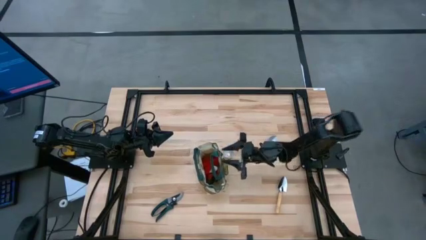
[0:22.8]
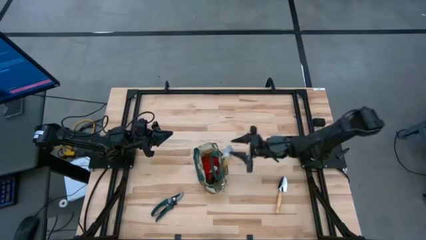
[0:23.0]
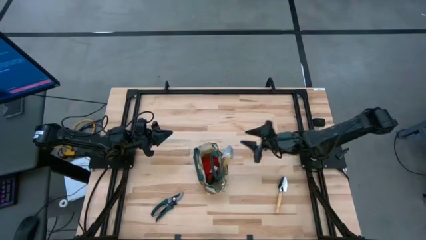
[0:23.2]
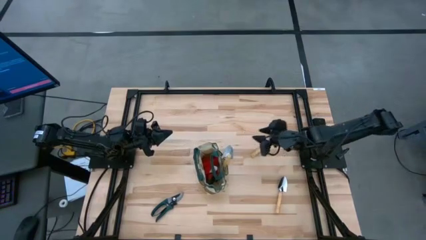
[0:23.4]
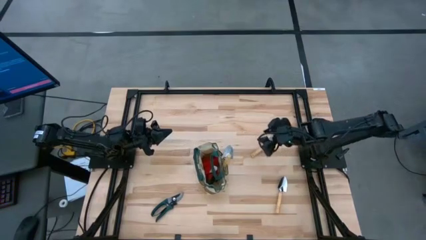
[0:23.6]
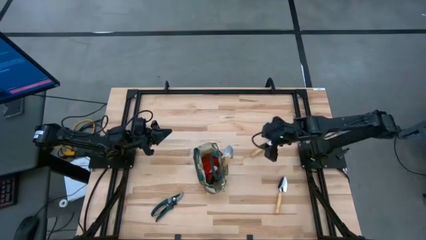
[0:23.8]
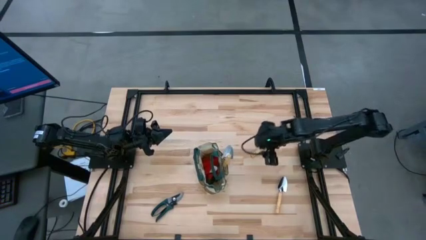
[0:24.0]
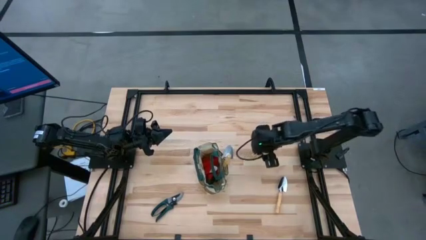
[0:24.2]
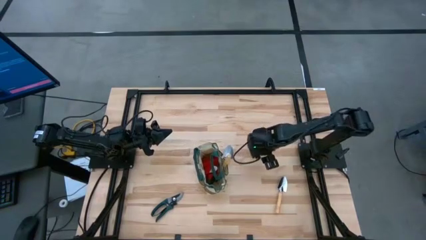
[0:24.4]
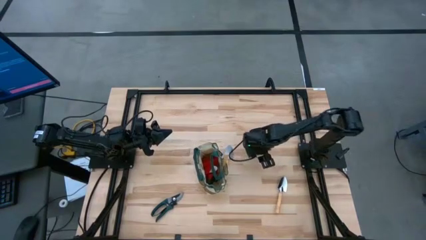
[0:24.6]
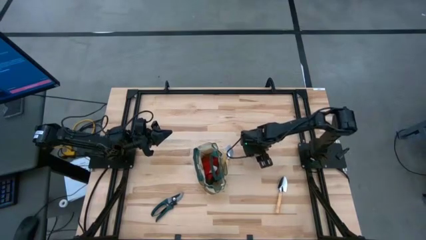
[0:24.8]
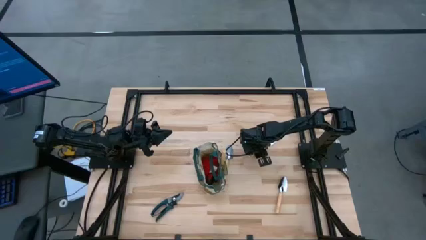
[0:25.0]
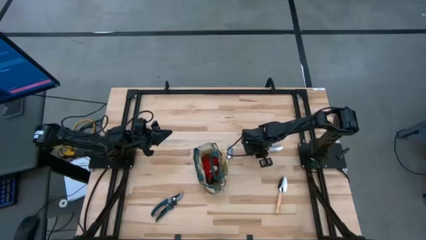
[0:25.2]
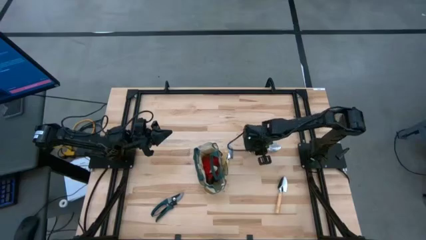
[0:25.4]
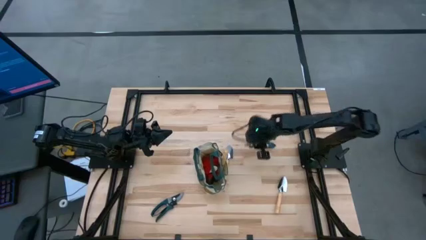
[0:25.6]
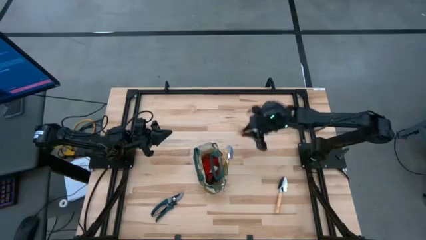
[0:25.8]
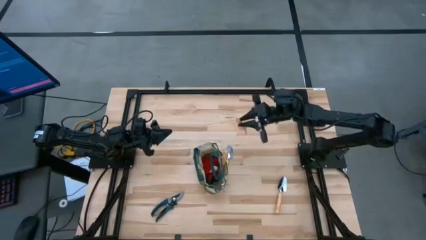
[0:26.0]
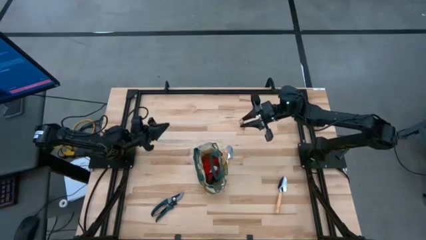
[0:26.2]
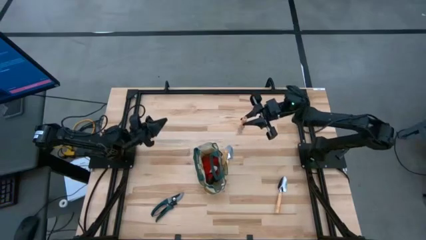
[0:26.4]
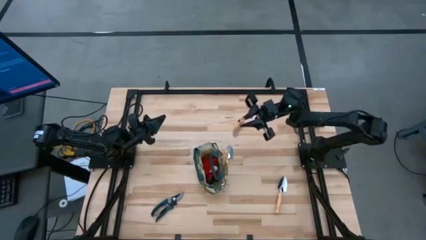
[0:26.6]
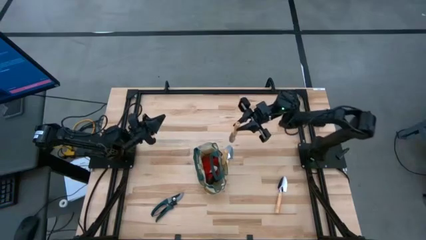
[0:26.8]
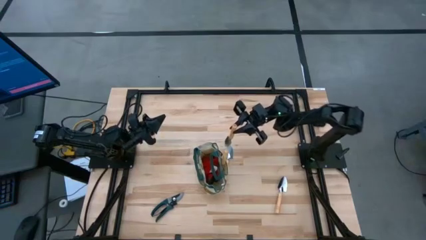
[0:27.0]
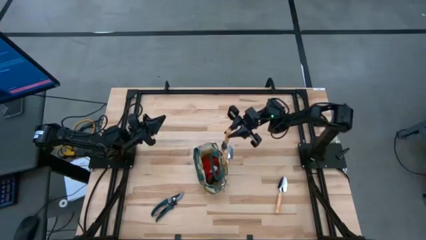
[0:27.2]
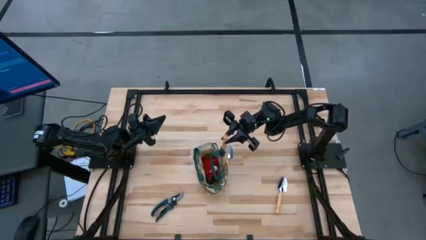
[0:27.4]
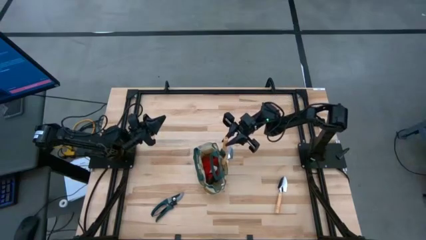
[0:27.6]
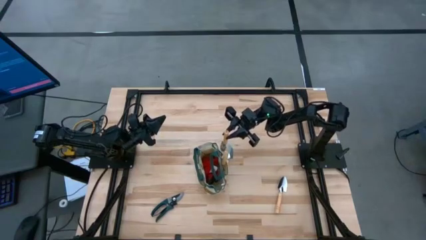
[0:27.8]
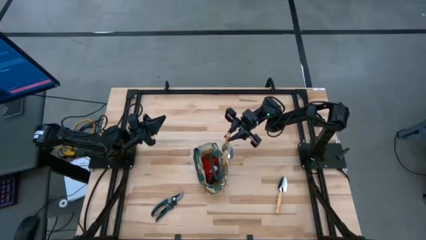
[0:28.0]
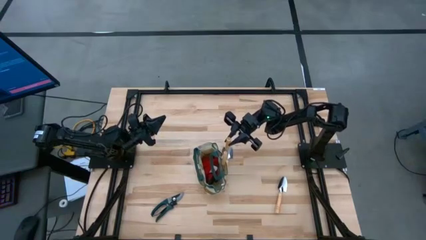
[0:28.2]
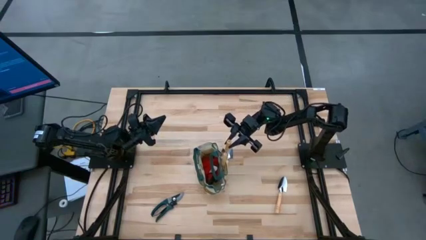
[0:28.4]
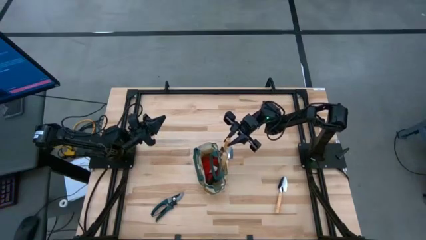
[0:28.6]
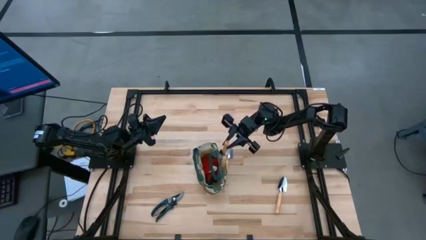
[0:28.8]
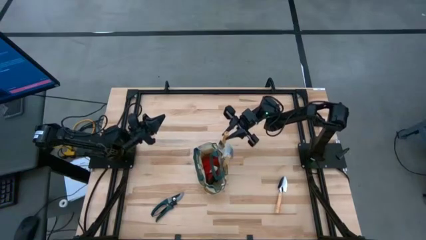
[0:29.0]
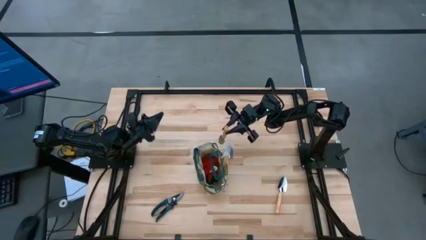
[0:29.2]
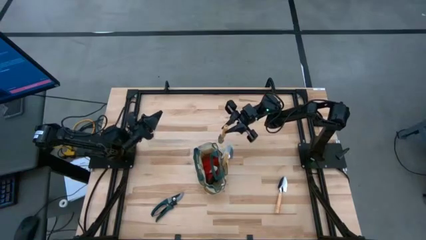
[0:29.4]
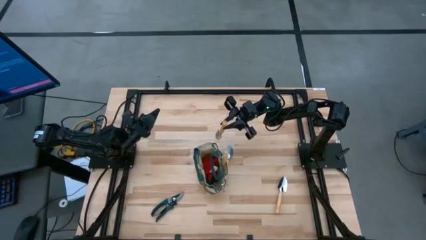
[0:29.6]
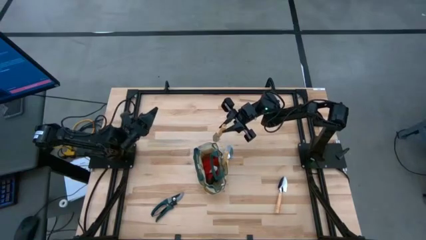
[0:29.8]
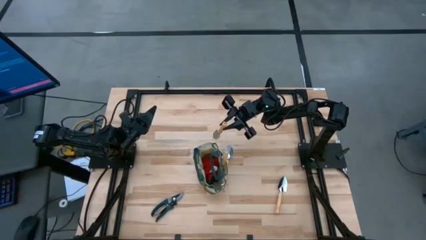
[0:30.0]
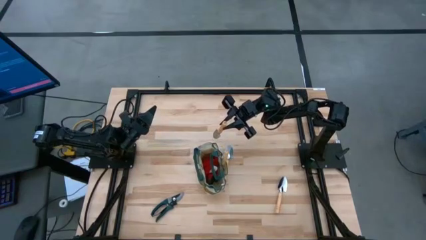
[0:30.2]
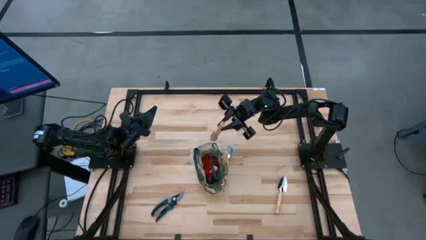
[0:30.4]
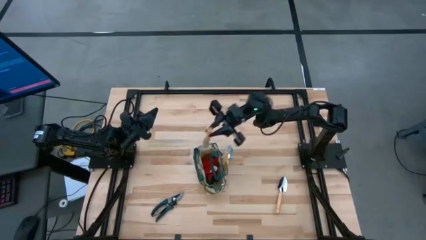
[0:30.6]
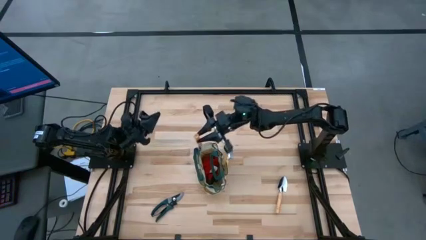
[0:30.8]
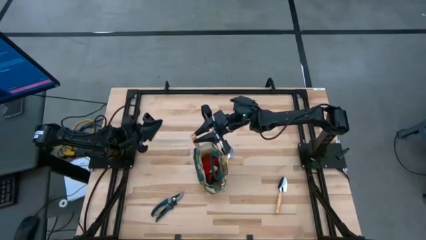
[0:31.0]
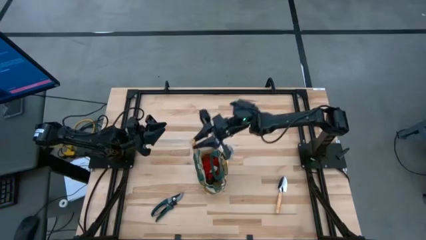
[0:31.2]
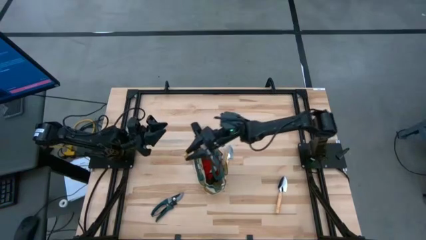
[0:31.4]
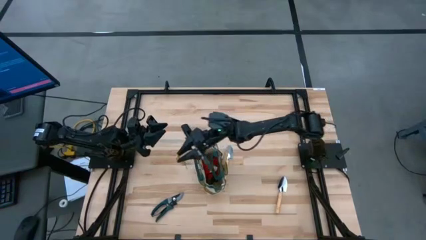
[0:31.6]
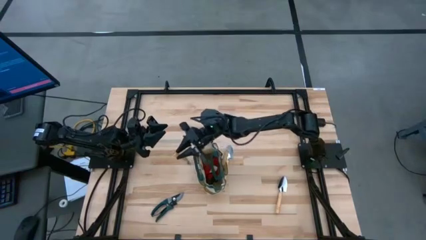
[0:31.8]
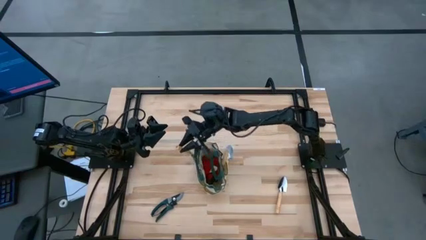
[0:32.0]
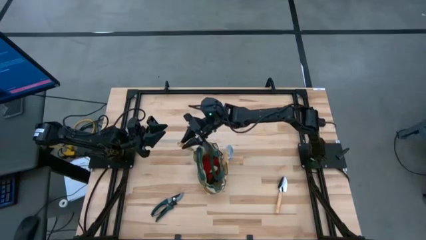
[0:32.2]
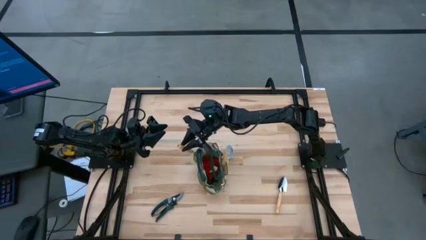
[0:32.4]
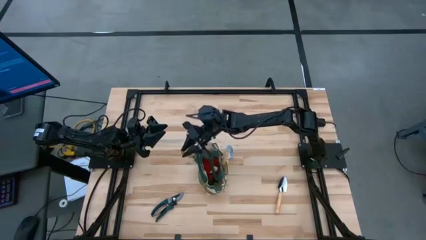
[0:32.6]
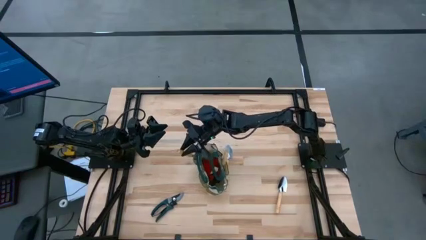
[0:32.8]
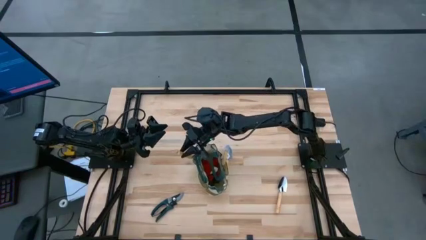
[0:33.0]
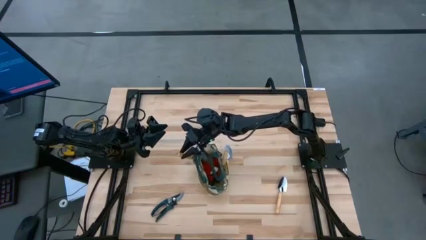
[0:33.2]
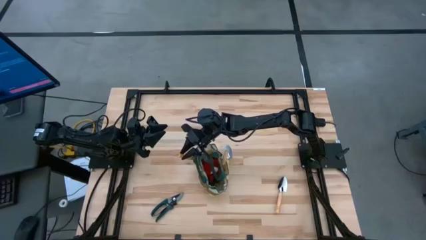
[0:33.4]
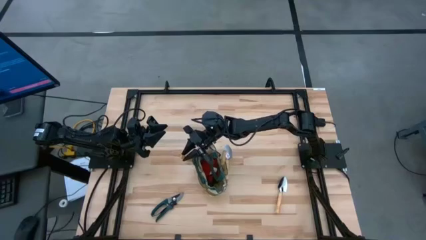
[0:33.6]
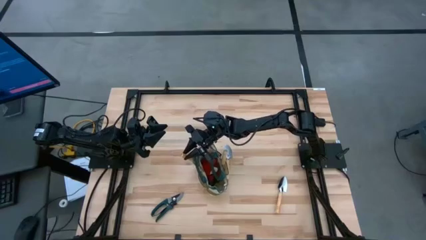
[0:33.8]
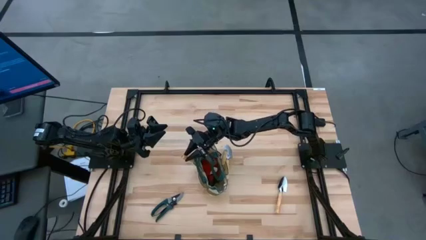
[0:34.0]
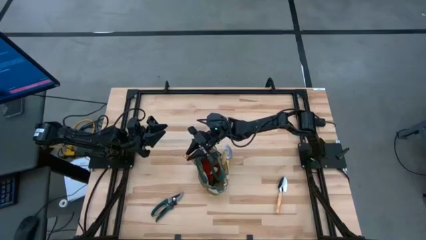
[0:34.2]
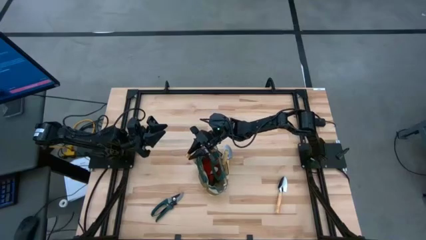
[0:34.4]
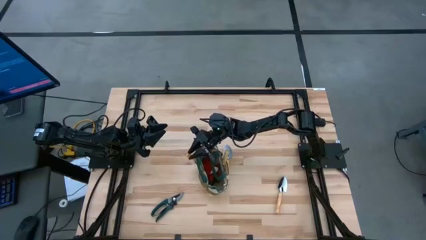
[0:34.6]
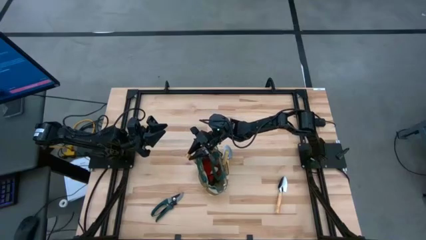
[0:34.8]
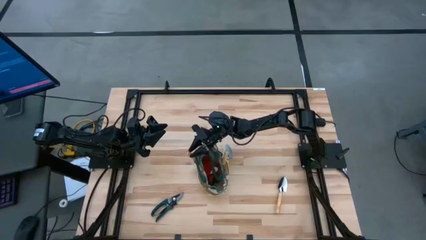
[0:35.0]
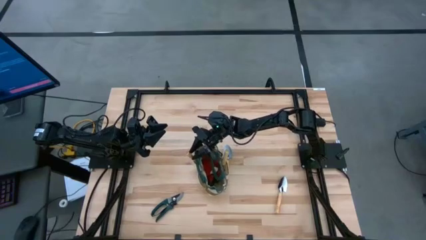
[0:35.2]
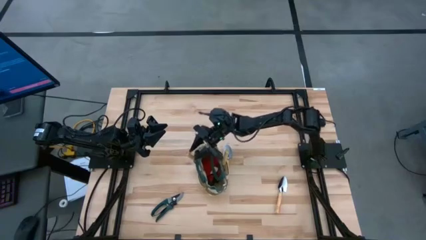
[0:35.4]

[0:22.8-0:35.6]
Task: Pick & Place Garden tools in Gardening bag
Put the trowel into the gardening bag
